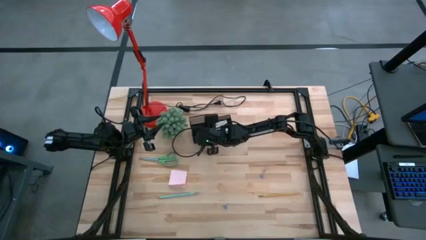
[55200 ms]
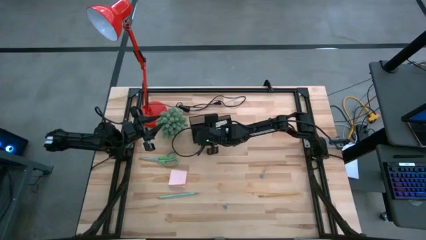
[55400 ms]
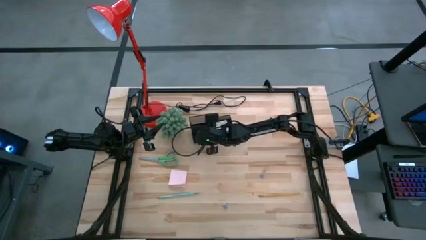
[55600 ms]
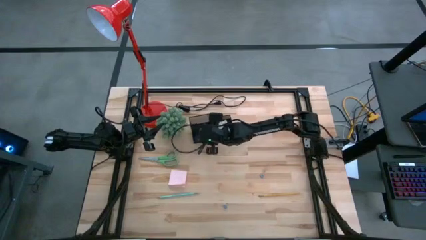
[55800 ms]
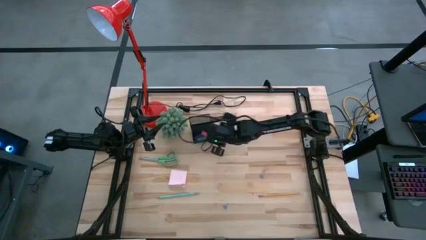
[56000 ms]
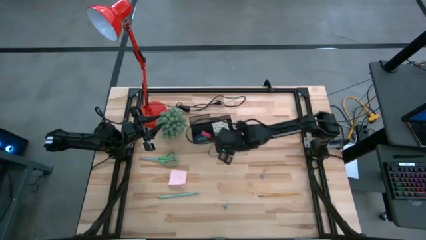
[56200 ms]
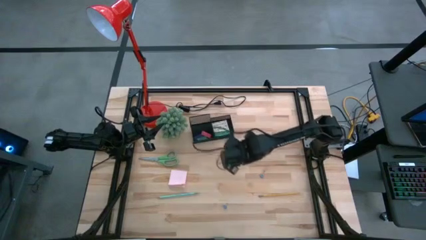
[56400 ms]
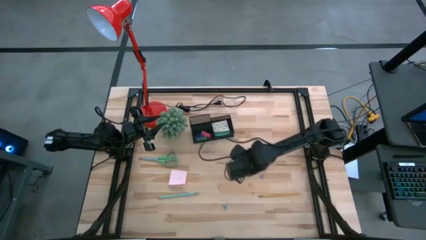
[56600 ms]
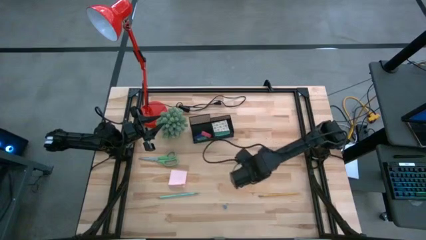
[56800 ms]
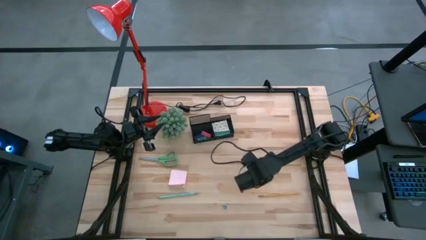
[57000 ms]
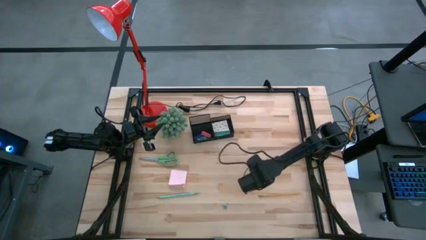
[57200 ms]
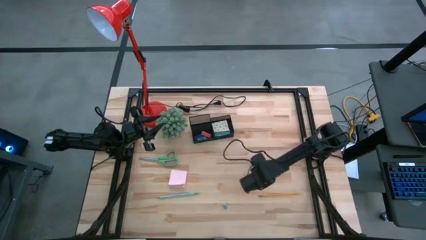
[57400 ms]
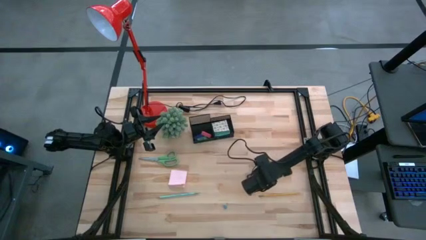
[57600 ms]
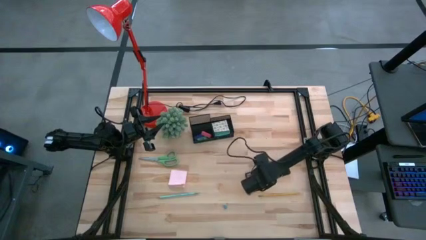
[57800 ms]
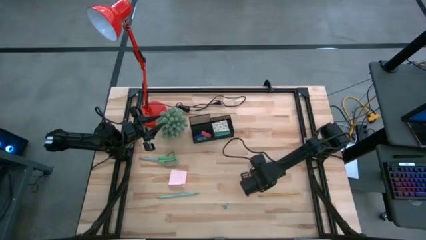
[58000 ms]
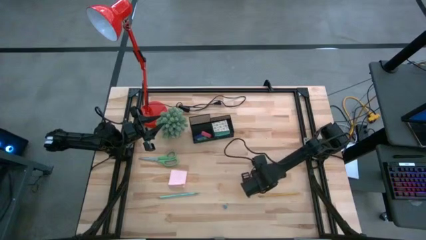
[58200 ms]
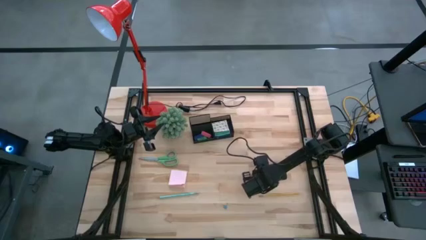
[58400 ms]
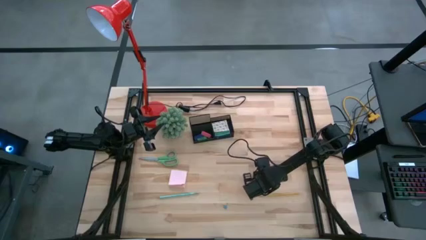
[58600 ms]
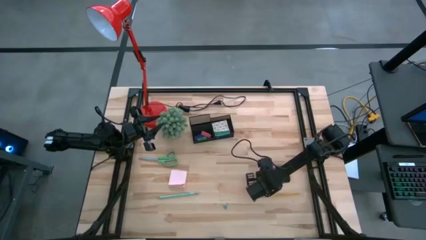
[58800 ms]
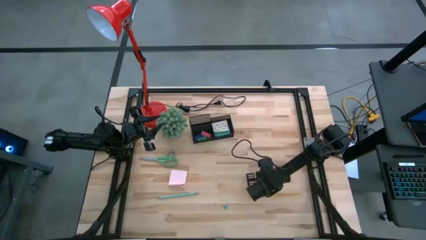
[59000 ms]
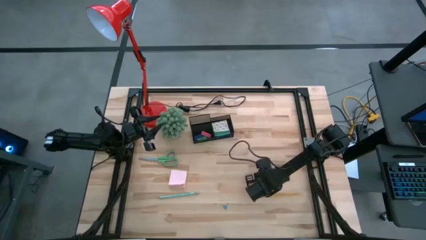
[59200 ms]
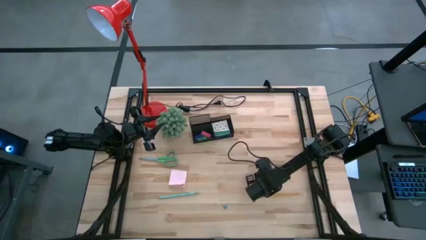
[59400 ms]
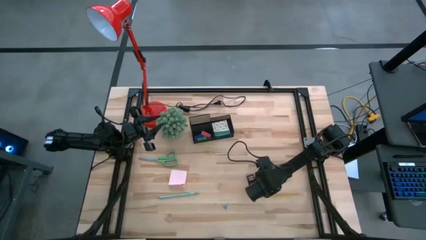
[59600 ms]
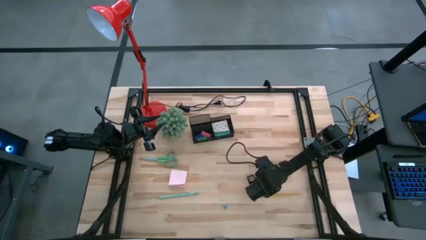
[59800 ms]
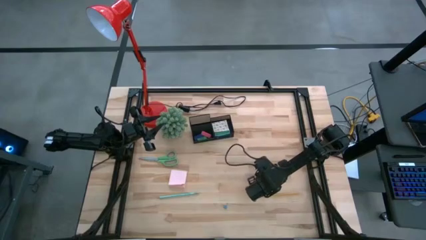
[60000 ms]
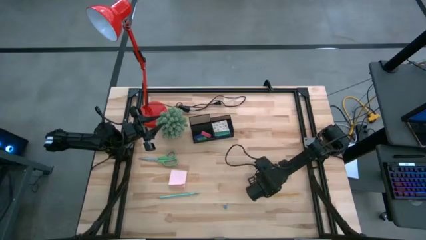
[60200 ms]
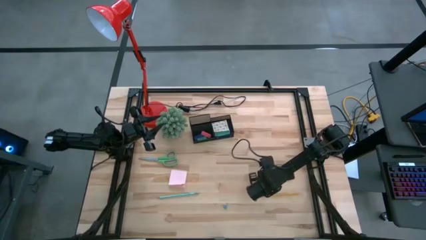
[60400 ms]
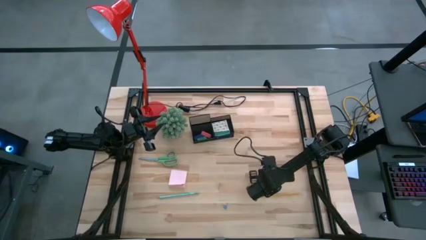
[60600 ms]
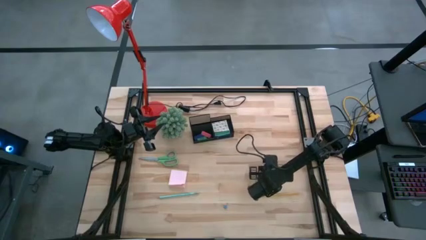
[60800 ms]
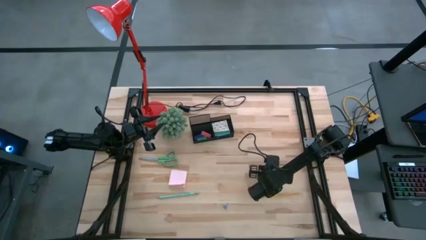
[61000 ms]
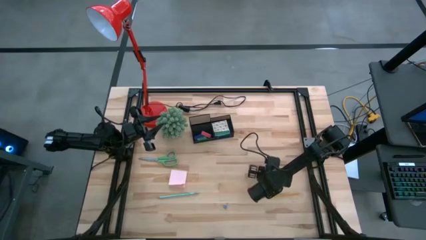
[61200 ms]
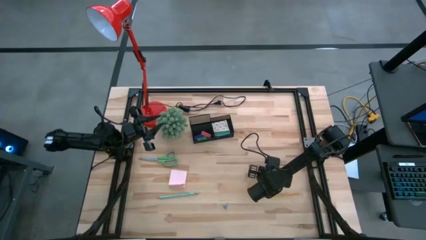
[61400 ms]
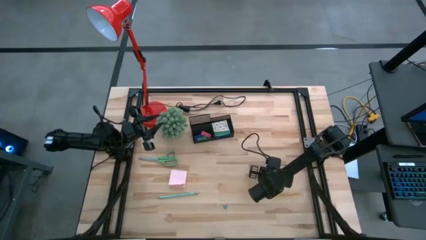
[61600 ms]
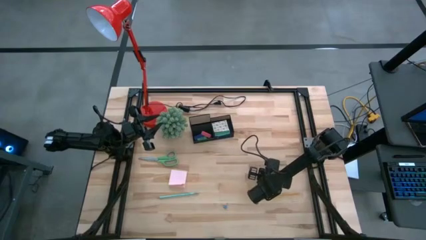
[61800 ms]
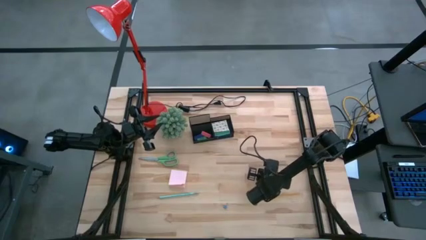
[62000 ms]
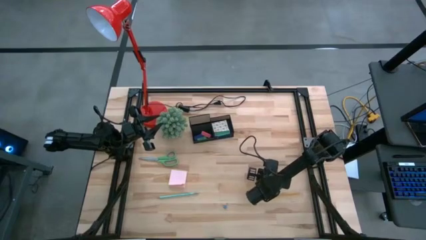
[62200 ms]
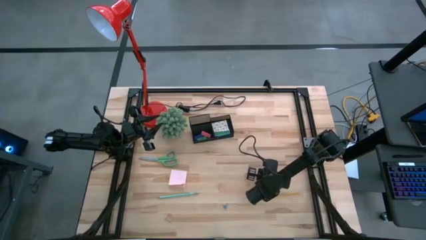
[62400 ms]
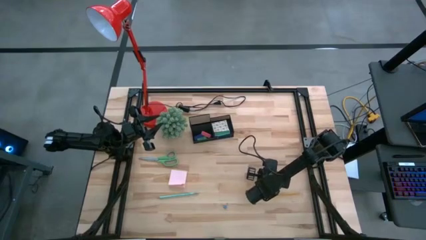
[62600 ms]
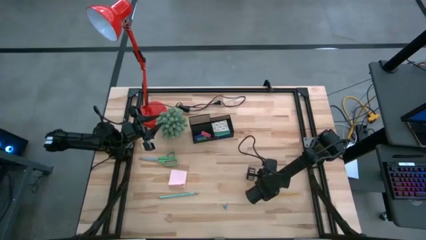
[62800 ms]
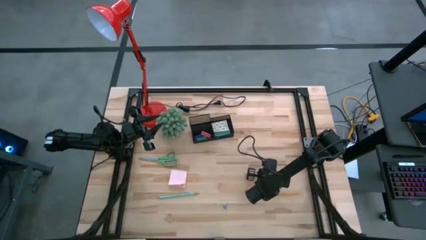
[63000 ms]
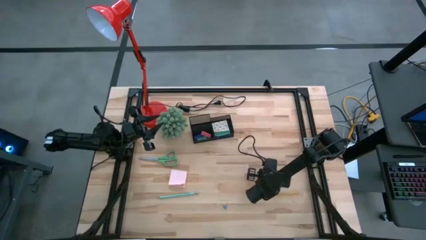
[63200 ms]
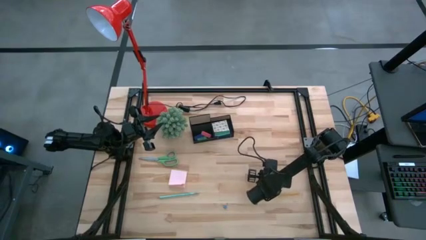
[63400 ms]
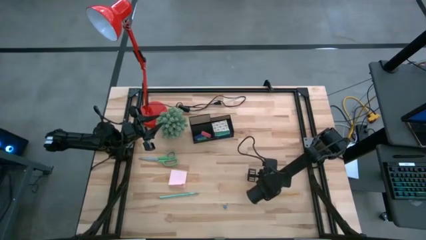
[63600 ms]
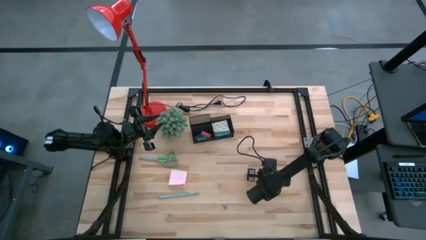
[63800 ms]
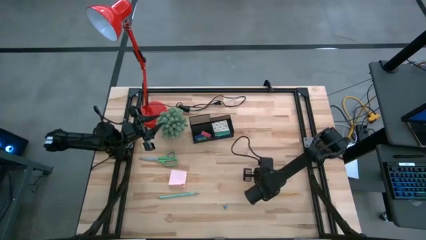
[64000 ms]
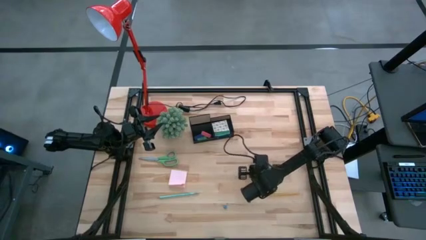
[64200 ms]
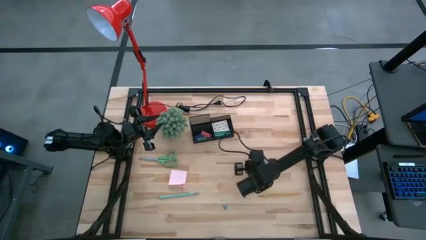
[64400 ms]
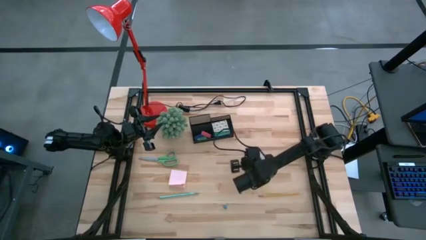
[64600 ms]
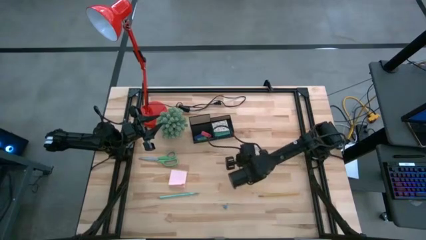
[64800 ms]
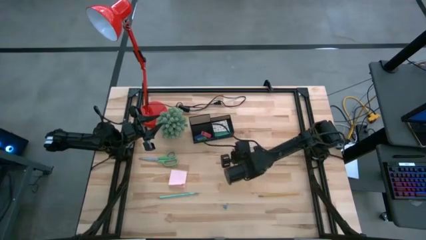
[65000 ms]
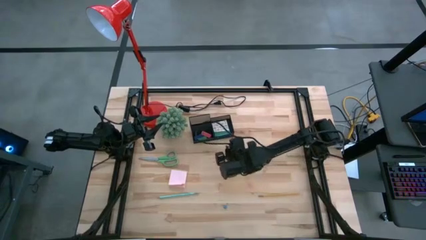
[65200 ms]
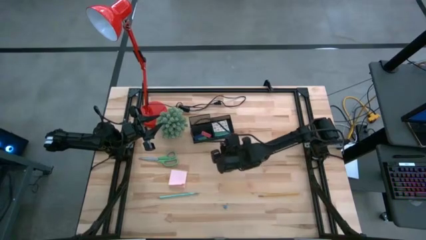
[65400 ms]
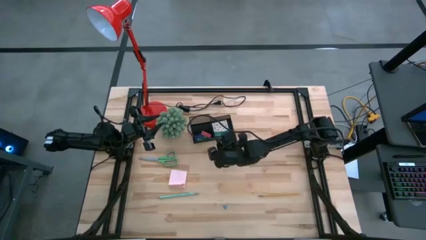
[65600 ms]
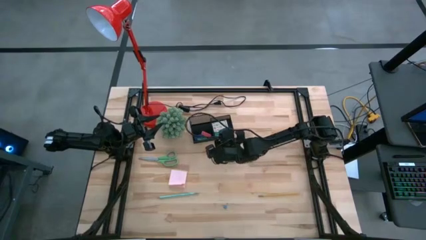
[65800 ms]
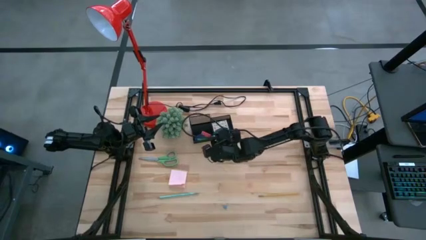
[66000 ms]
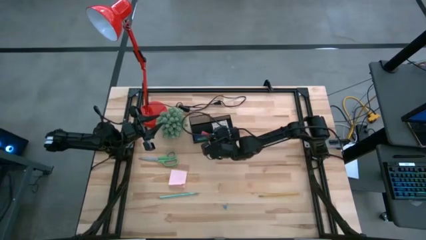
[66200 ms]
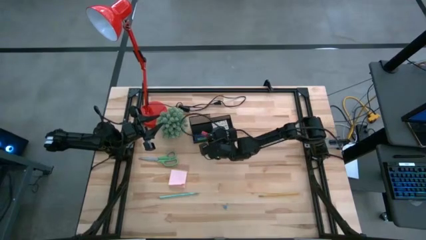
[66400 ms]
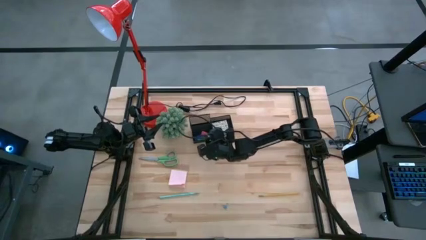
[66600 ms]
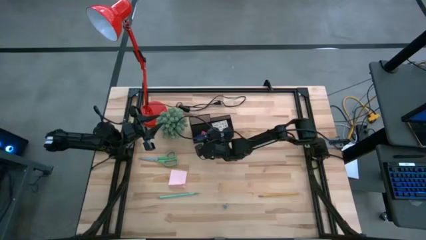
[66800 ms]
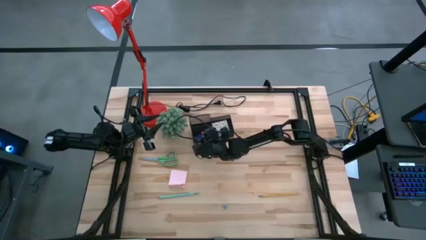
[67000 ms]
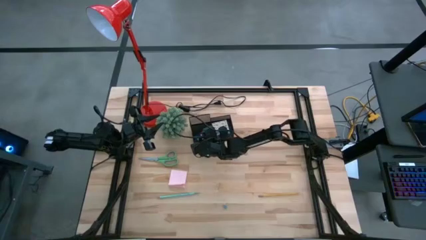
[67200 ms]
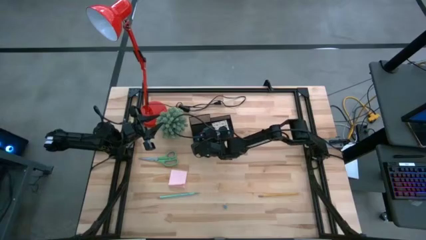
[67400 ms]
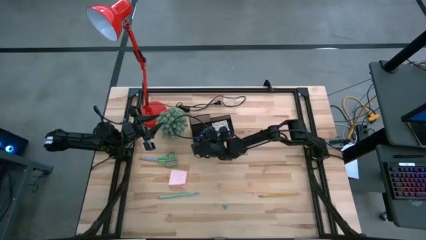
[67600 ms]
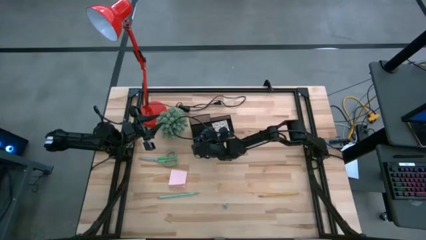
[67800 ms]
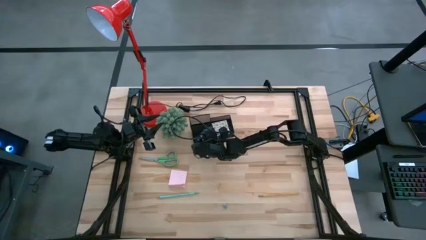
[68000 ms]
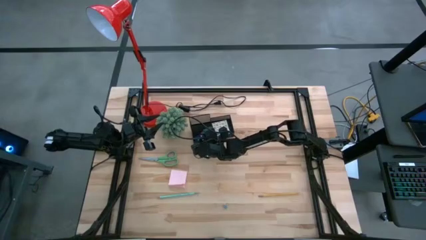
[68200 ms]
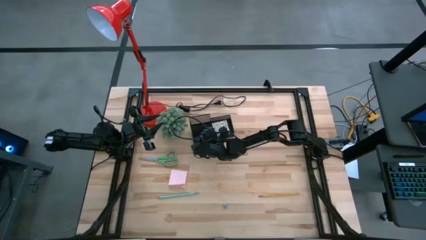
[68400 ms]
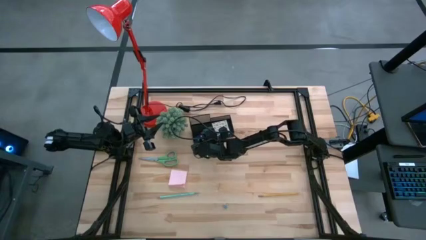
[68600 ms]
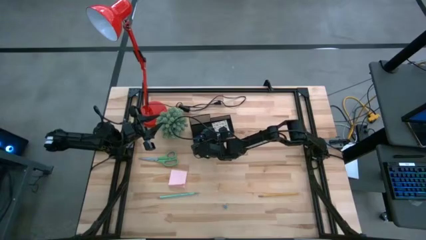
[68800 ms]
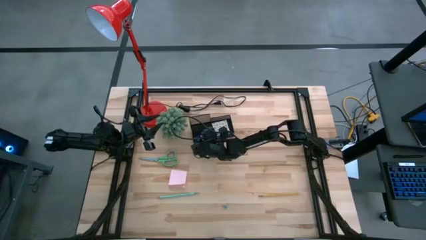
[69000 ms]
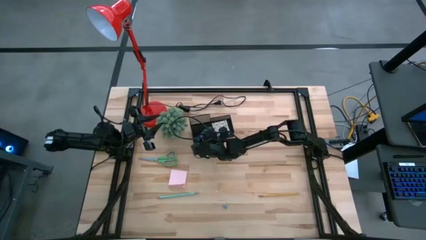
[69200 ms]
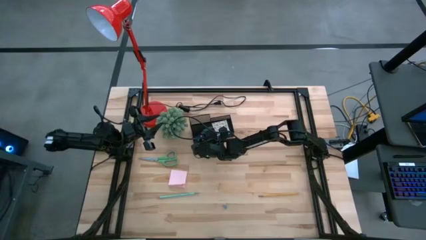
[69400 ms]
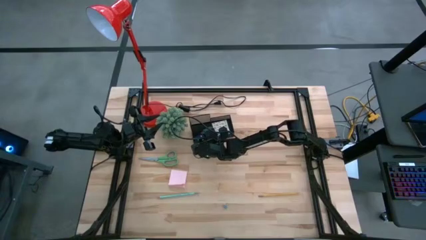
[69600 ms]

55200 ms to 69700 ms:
Task: Pick and place office supplies into organizer
Put the top blue binder clip into the desk organizer

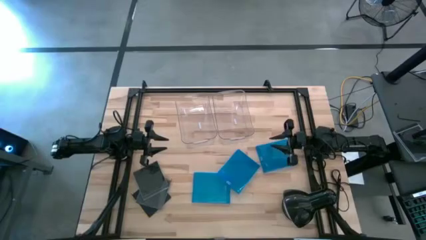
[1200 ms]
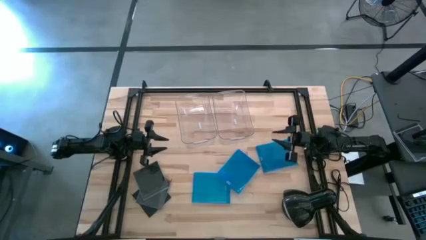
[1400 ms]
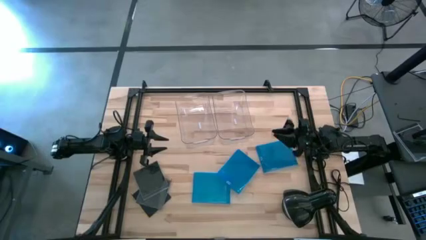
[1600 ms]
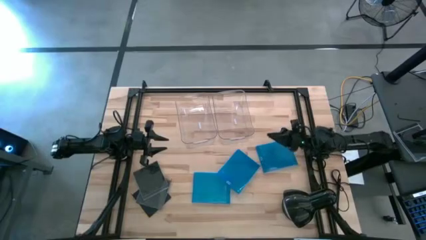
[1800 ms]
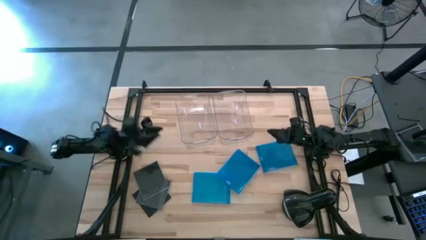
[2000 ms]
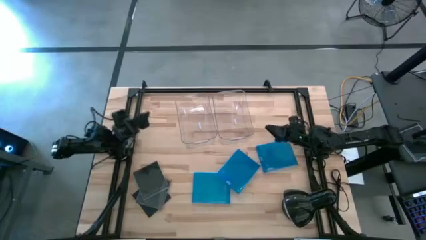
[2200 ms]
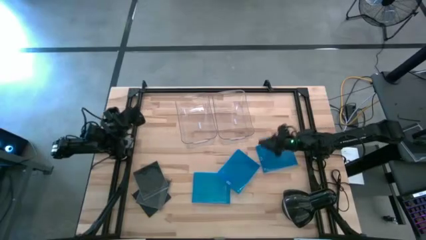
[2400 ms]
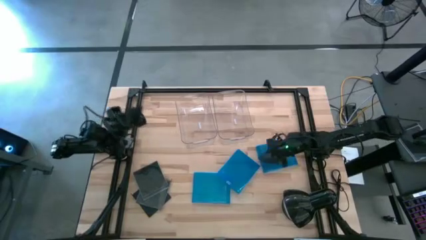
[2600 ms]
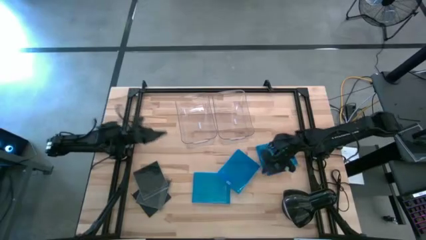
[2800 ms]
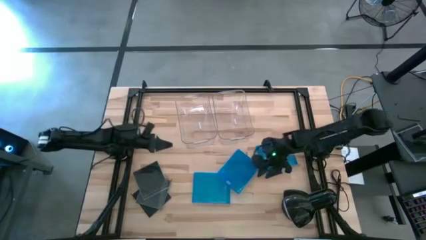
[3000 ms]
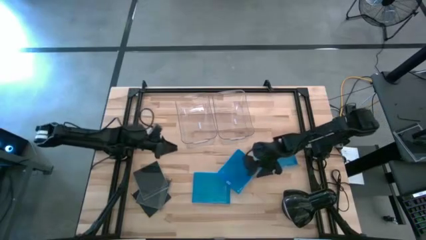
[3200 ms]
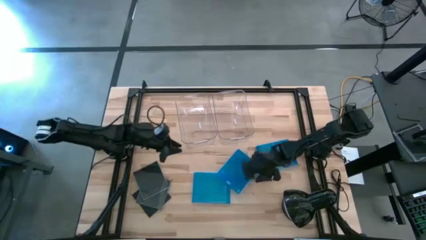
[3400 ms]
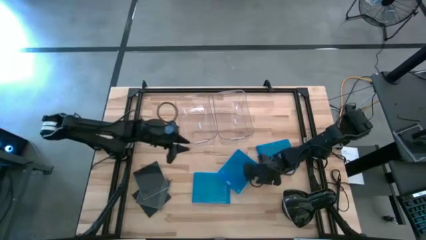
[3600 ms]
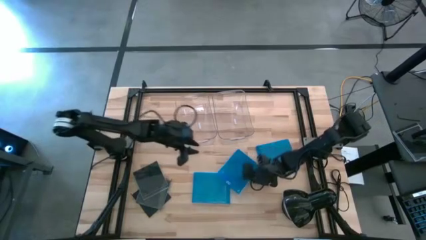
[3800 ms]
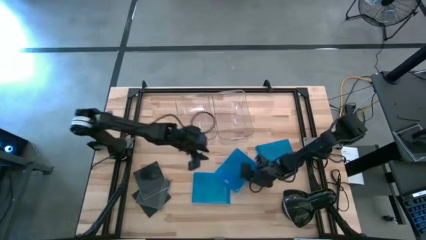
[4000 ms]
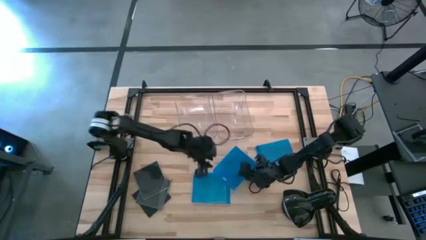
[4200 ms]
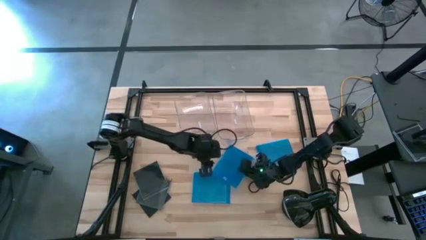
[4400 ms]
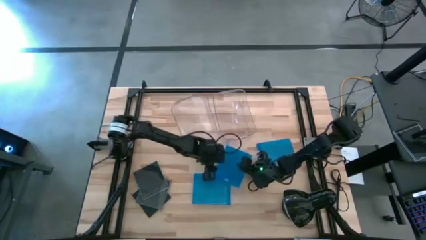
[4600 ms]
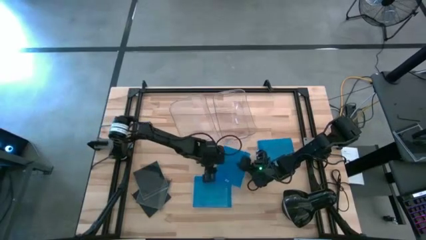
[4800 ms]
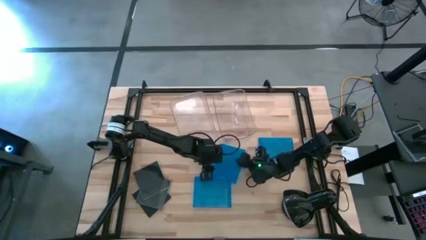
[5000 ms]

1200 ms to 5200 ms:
Task: Pick & place jewel cases by type
Put the middle blue CD case into the right transparent bin
